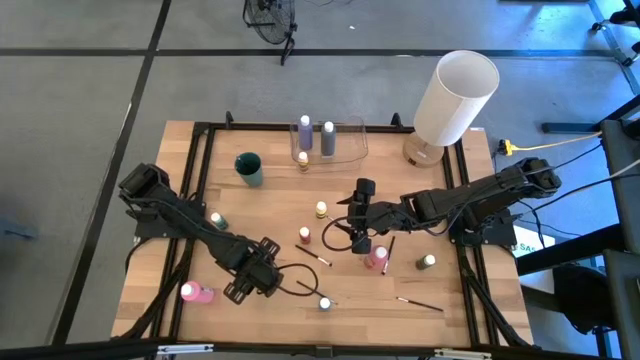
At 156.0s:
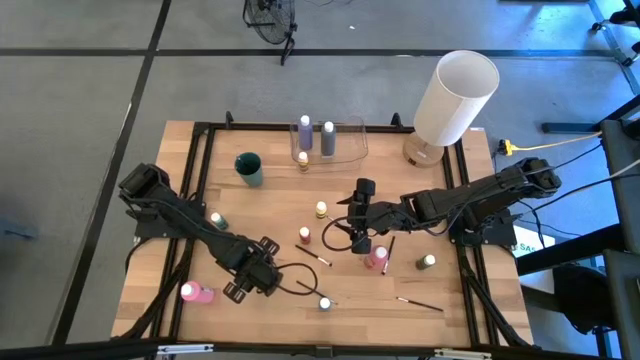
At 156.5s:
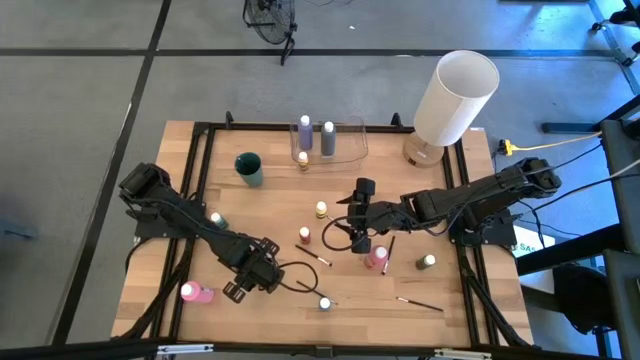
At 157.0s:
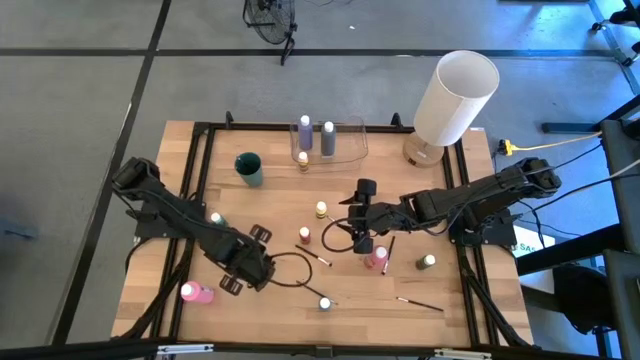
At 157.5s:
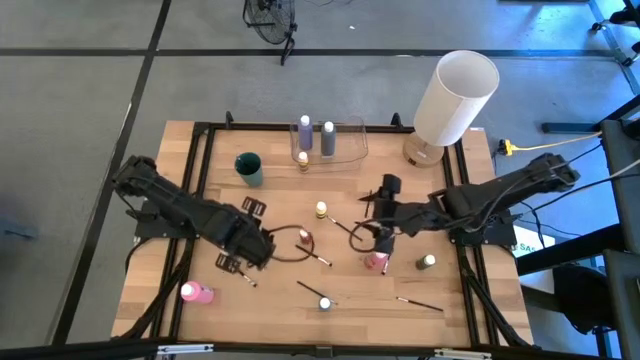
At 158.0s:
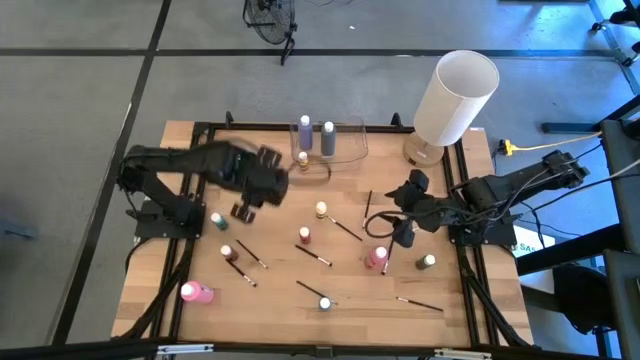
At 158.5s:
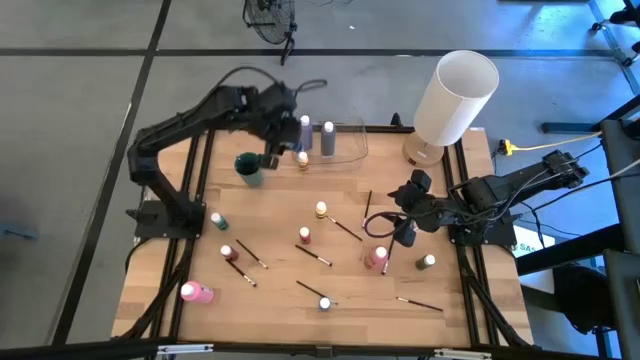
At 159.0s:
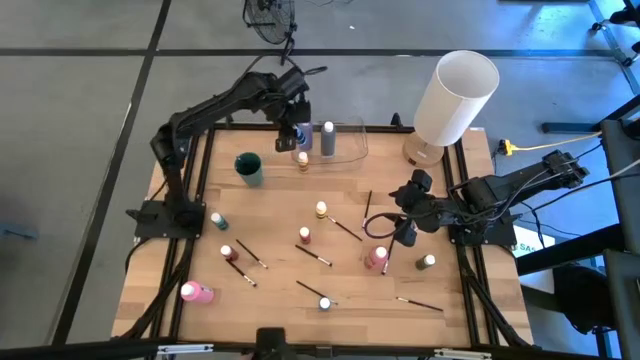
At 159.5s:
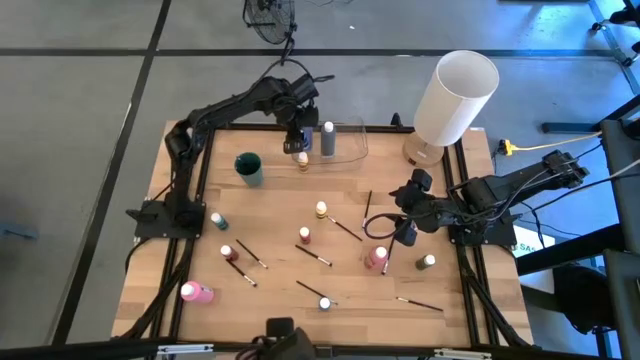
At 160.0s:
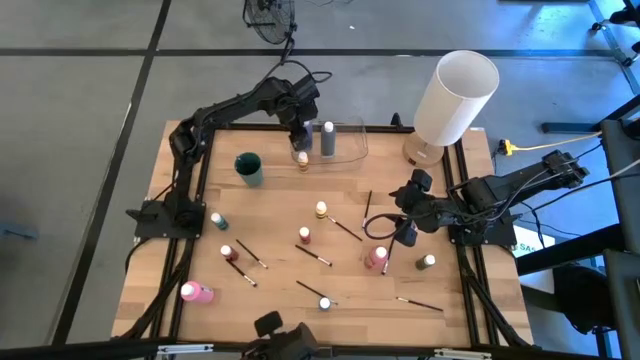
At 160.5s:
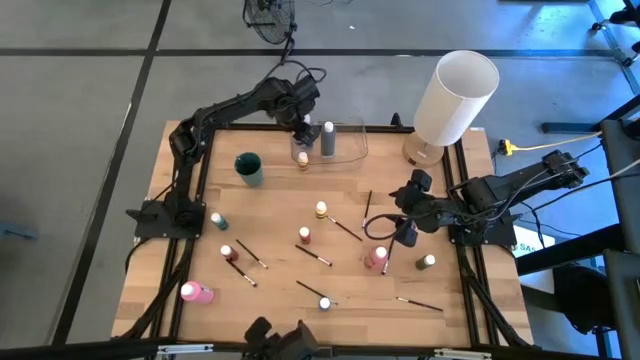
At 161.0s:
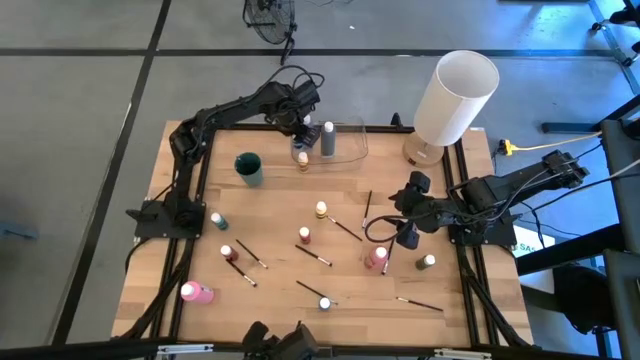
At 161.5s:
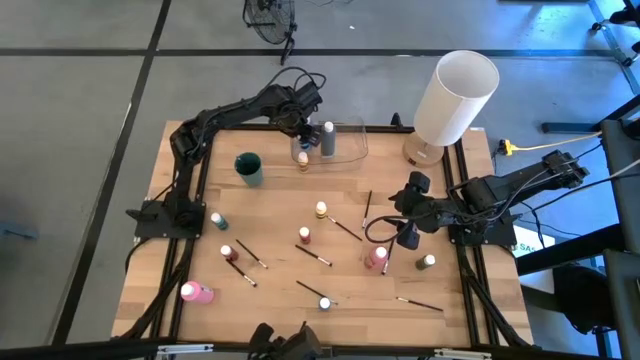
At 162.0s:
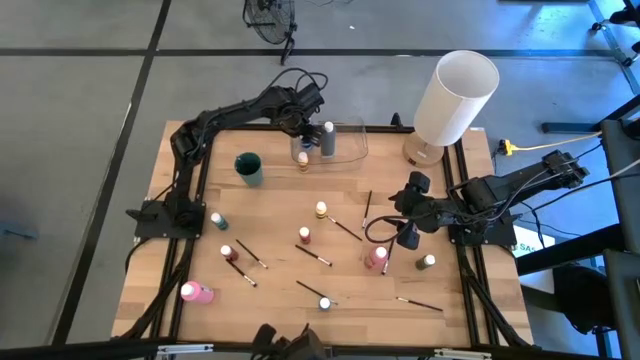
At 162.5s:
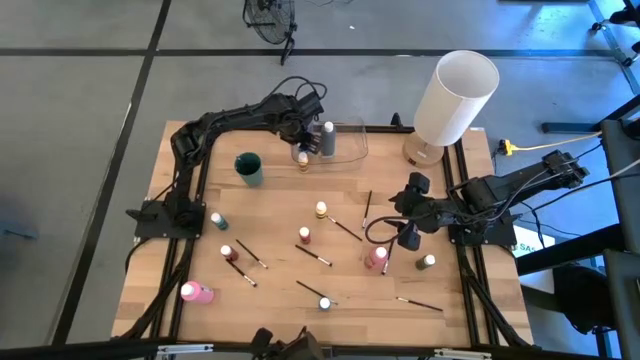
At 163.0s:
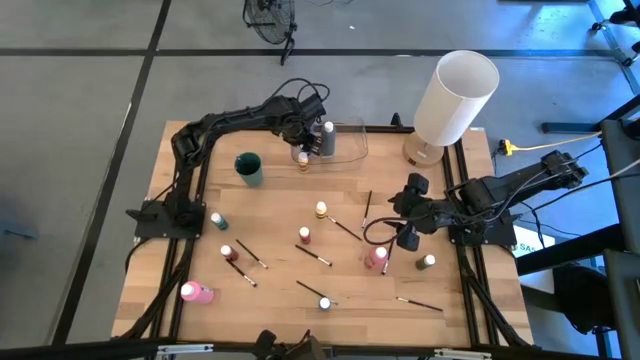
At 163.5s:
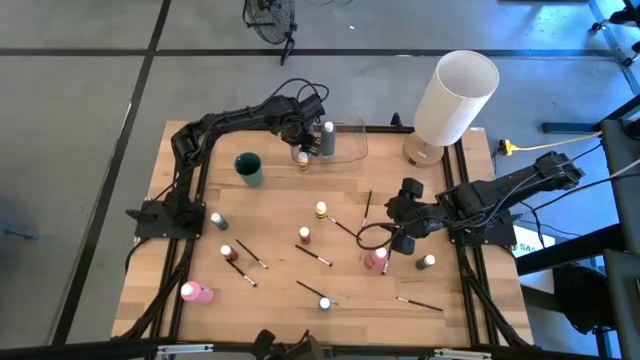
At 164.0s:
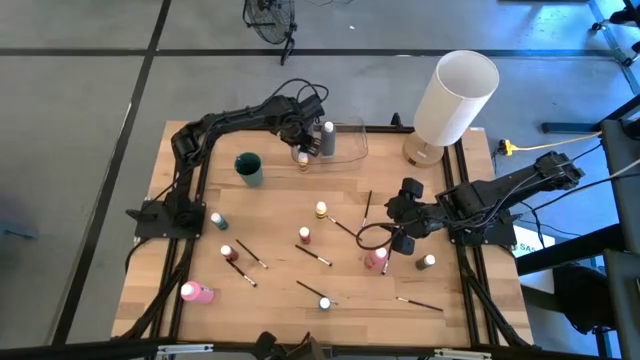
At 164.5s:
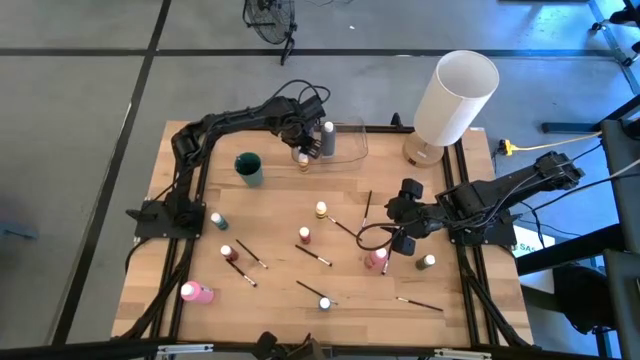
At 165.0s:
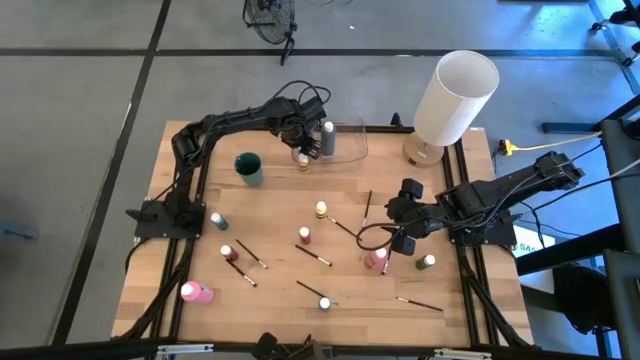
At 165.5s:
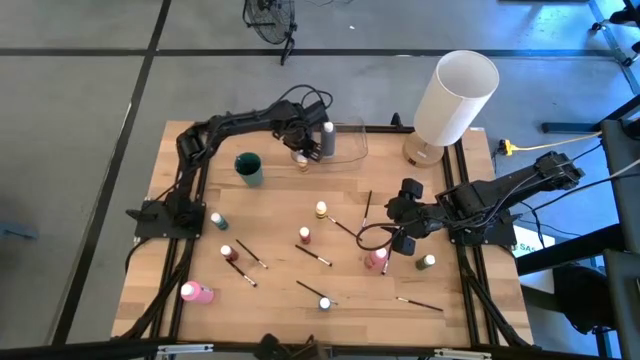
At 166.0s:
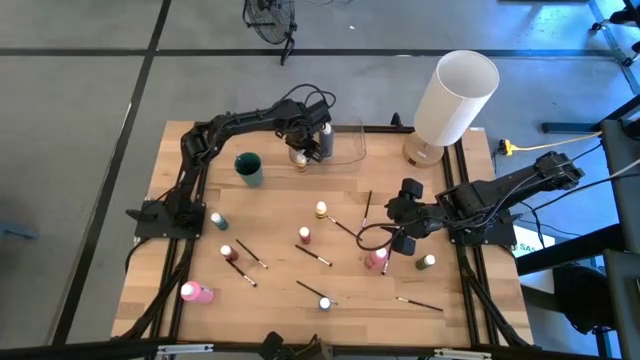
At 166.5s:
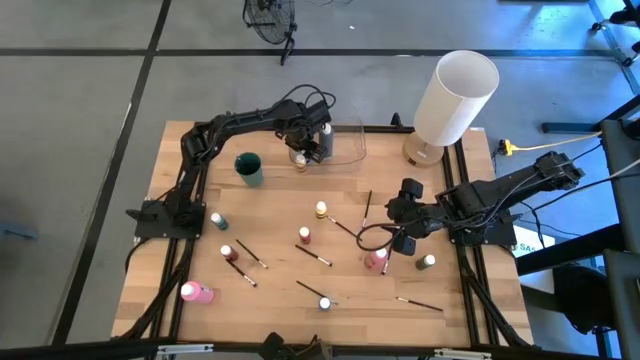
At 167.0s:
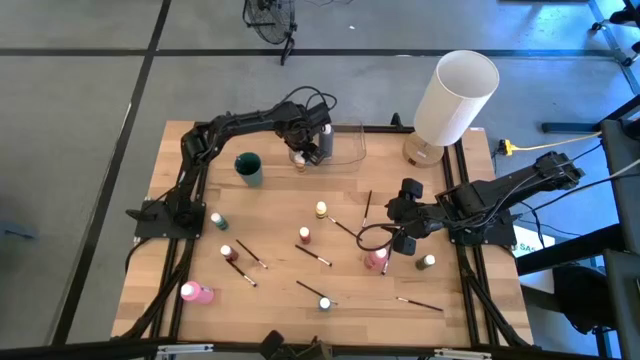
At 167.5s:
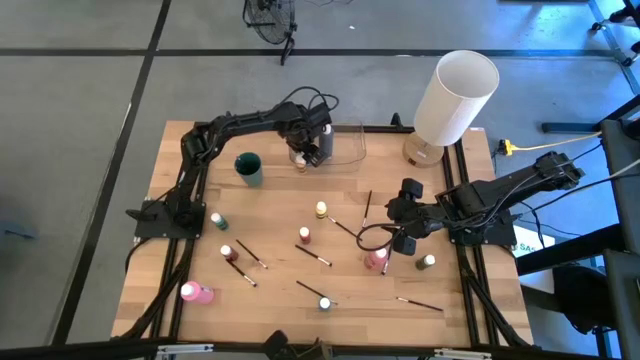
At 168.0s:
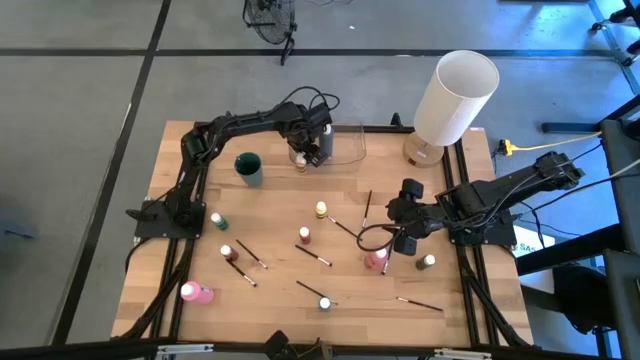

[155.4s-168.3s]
Task: Pick & Place Paint Supplies
Put the blue paint bottle into the transparent bin

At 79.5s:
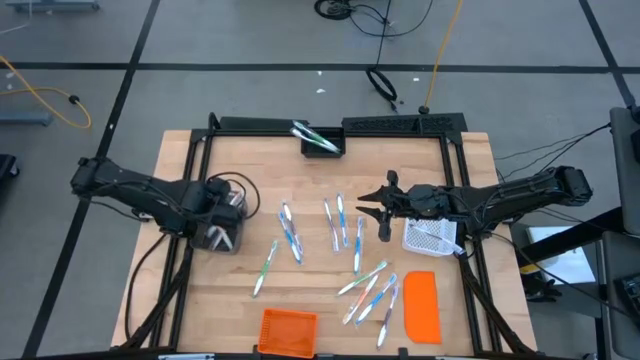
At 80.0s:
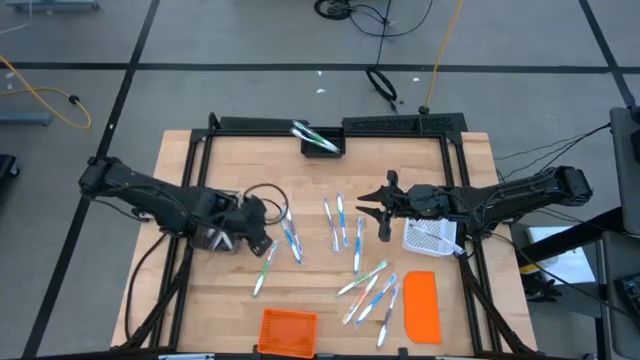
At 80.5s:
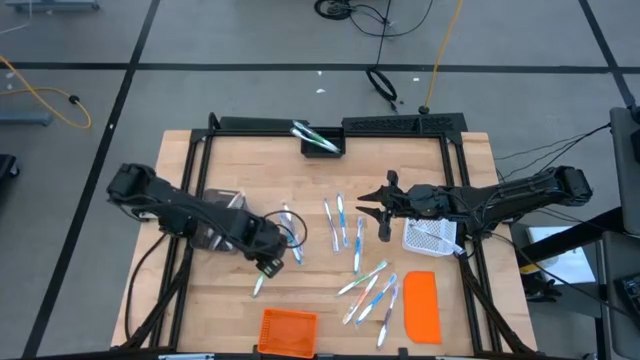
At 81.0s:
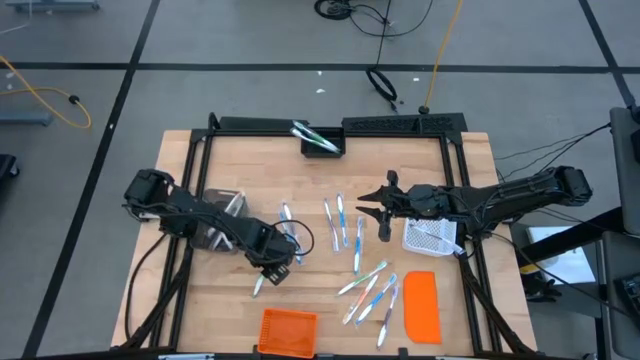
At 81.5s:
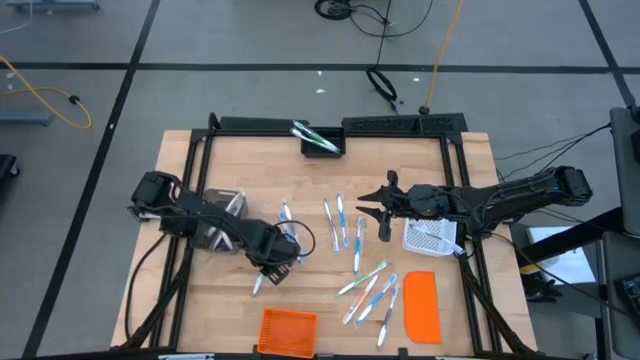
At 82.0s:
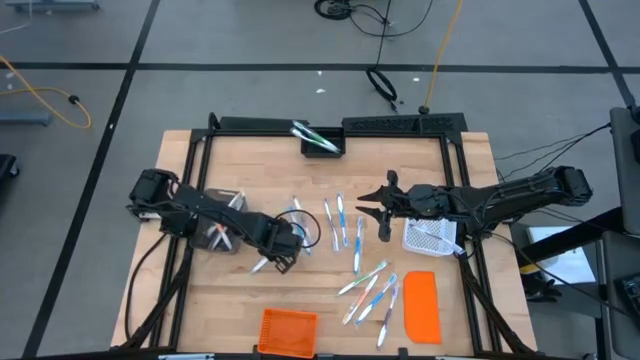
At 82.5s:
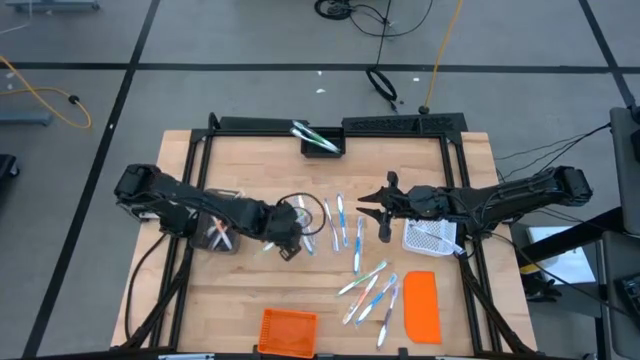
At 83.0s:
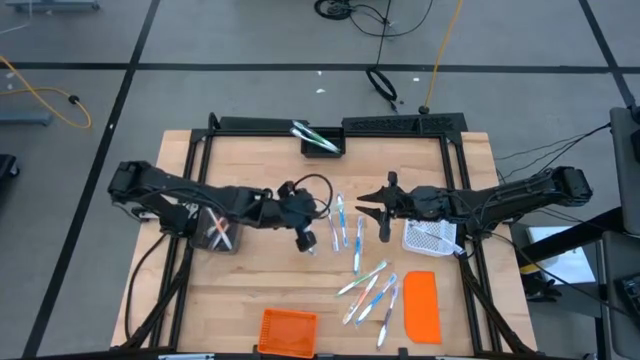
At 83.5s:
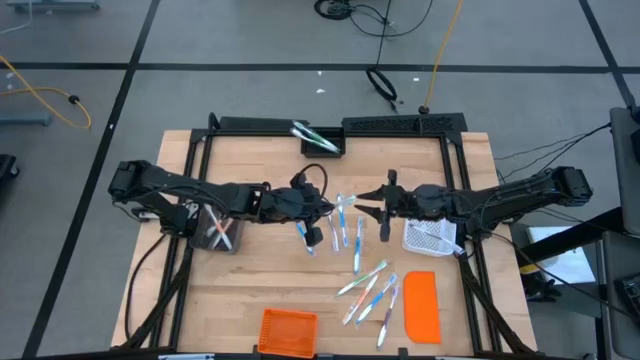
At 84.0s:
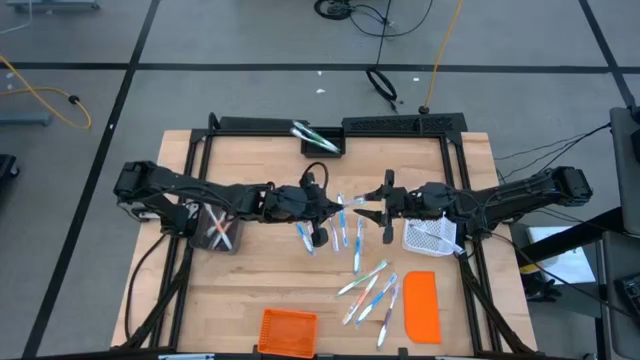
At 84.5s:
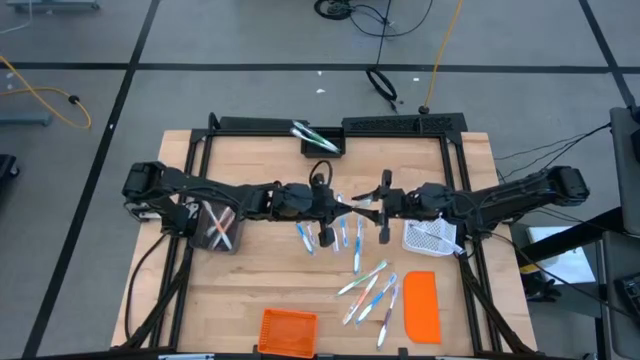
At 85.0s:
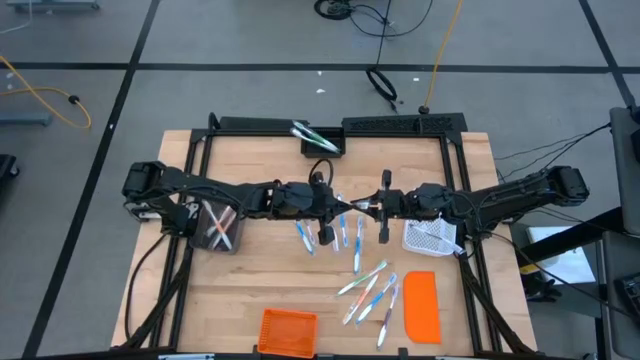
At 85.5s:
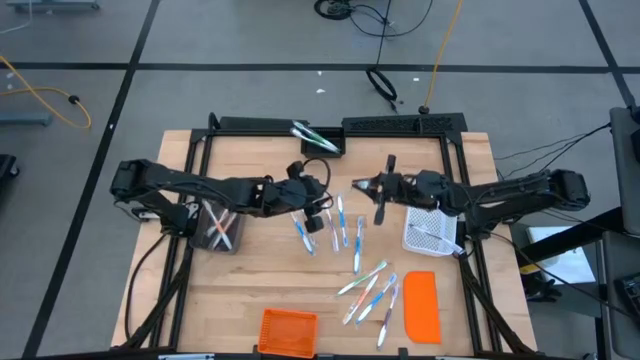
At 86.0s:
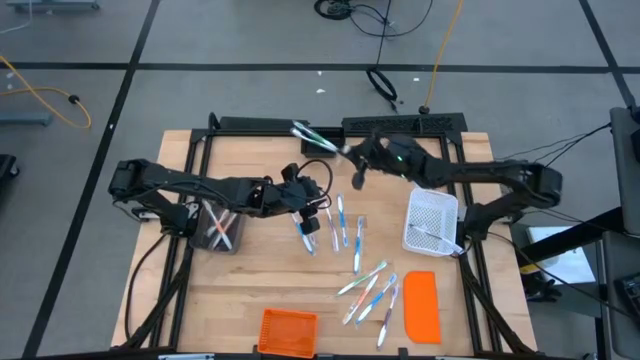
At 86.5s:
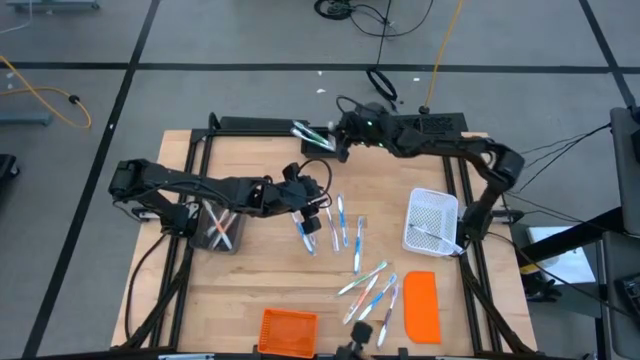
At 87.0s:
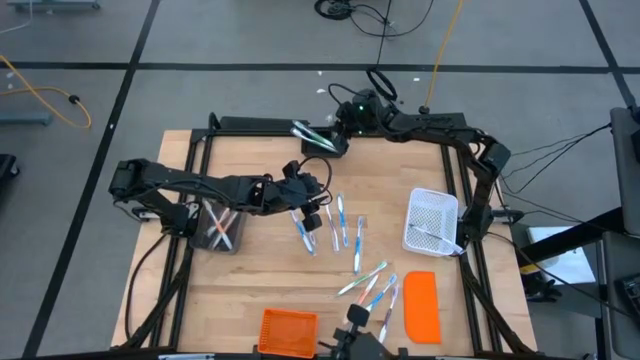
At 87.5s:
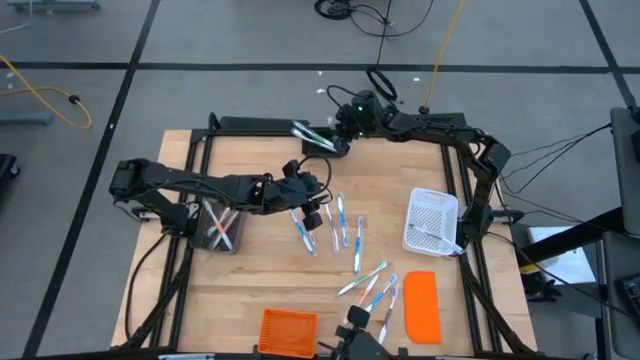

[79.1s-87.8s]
Task: Pick & Place Toothbrushes
Put the green toothbrush into the black bin

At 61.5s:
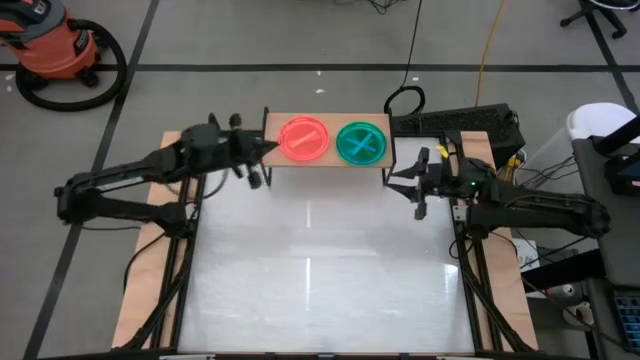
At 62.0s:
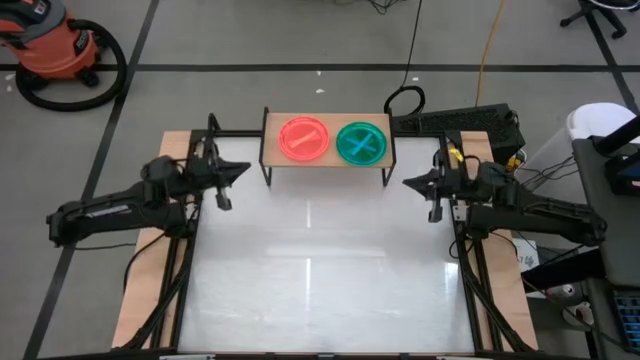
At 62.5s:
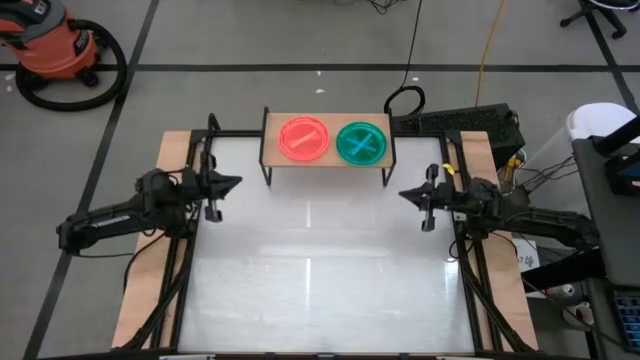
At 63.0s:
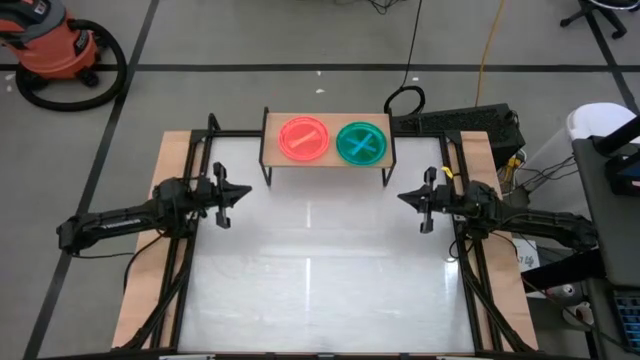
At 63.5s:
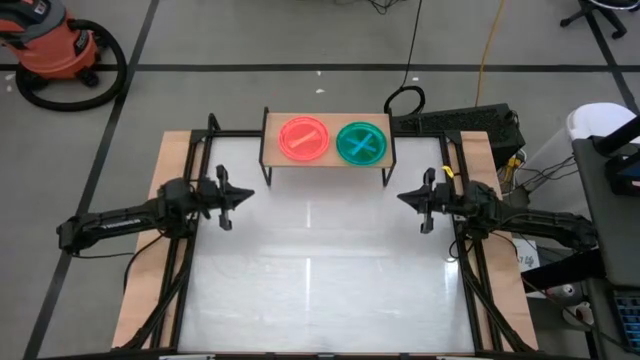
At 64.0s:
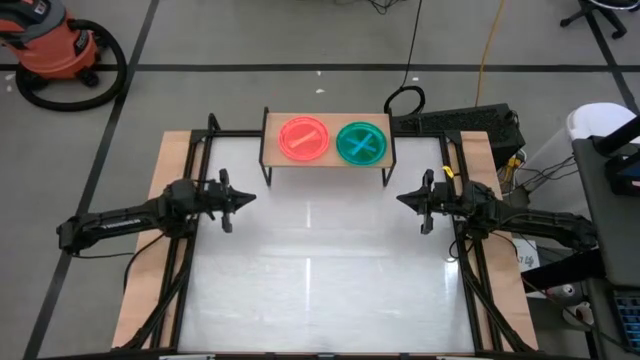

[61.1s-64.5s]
Task: Place and stack plates onto a shelf
Return to Home Position
